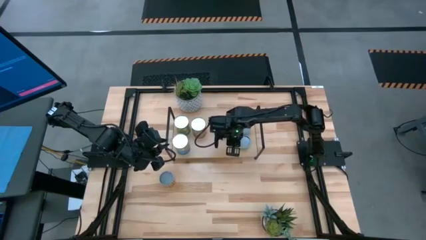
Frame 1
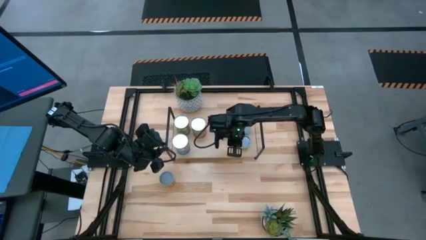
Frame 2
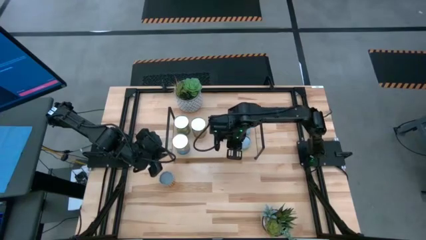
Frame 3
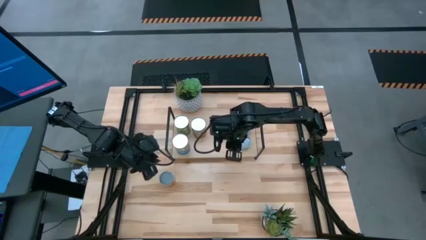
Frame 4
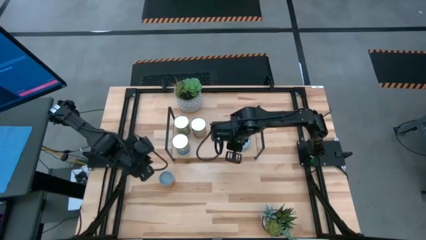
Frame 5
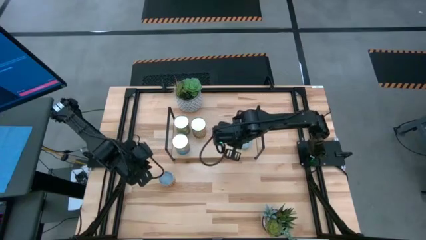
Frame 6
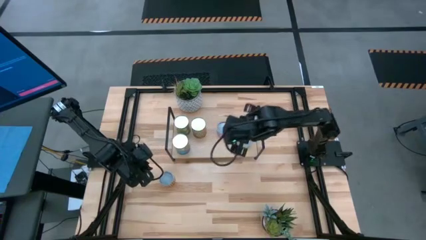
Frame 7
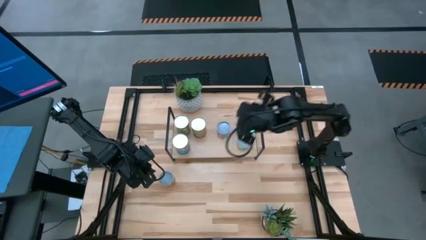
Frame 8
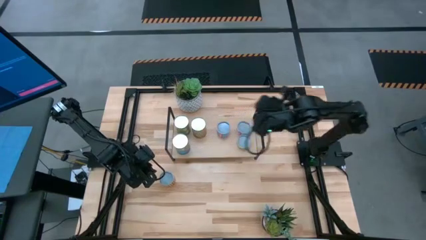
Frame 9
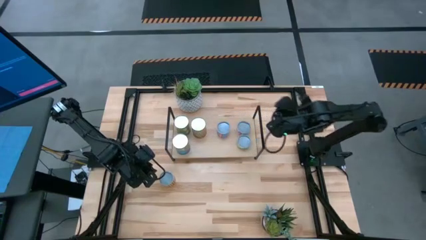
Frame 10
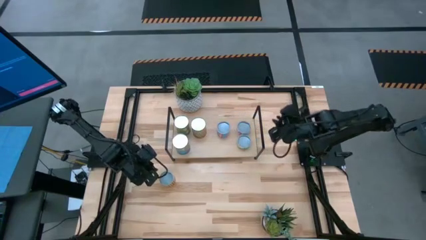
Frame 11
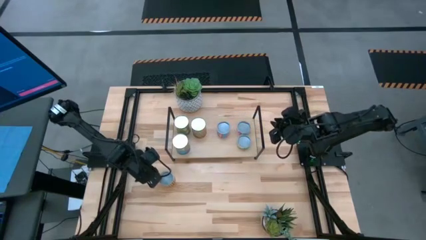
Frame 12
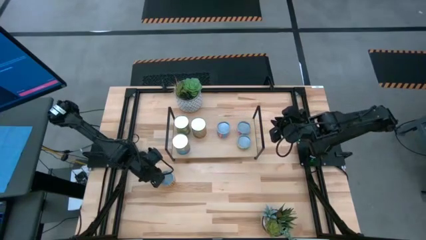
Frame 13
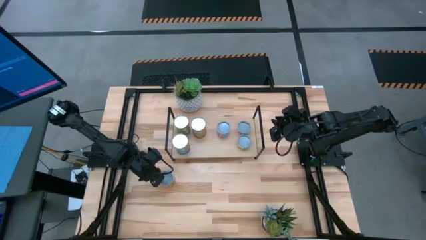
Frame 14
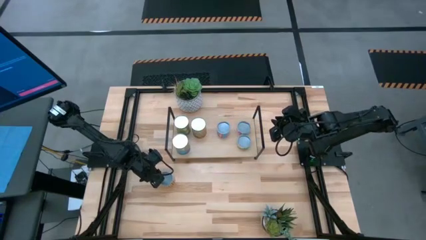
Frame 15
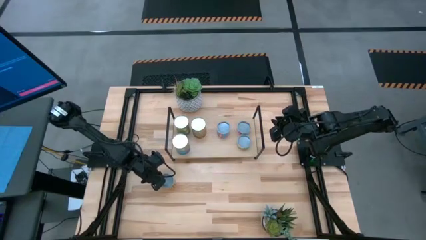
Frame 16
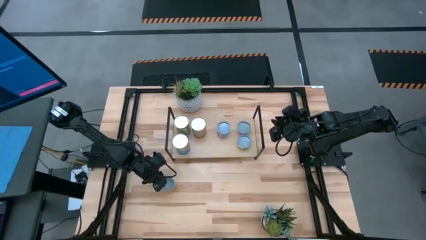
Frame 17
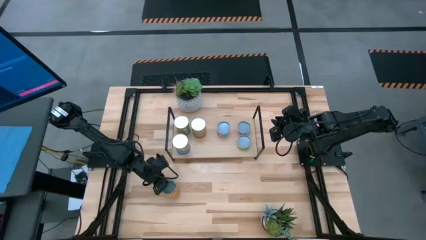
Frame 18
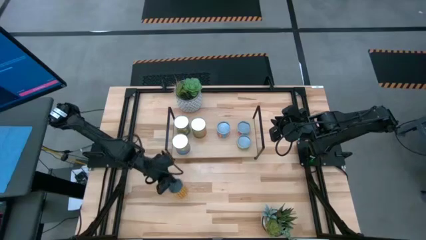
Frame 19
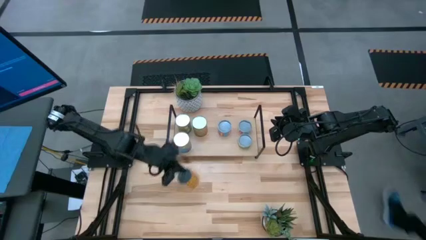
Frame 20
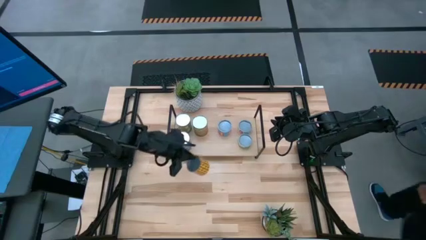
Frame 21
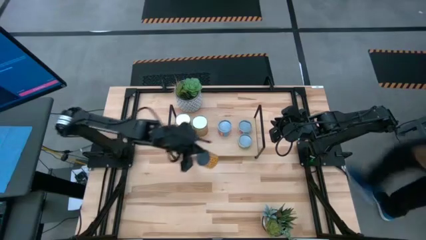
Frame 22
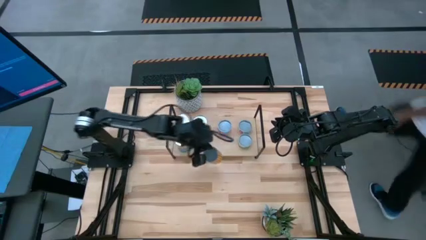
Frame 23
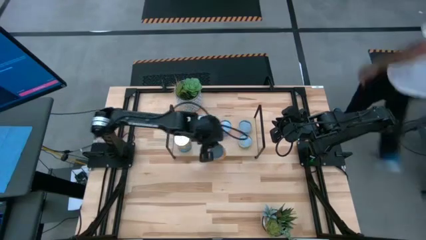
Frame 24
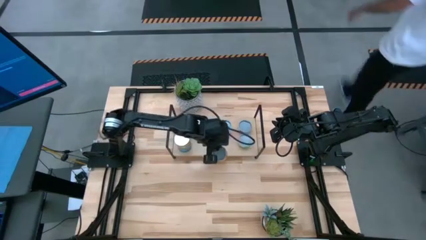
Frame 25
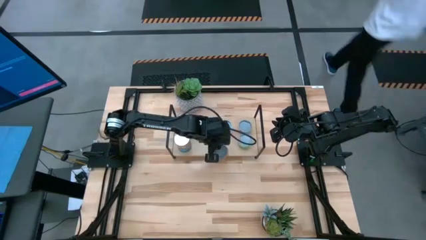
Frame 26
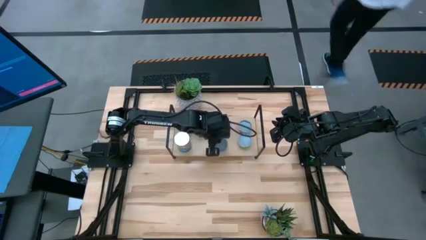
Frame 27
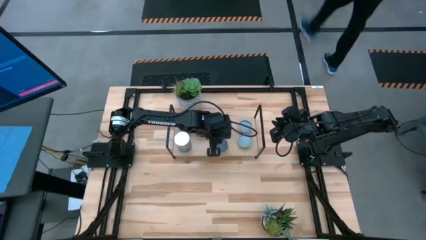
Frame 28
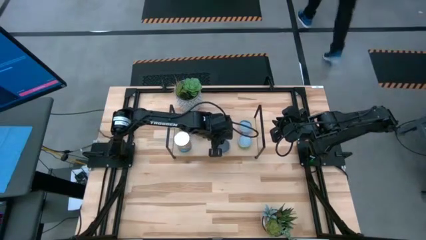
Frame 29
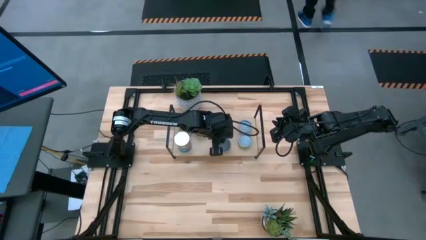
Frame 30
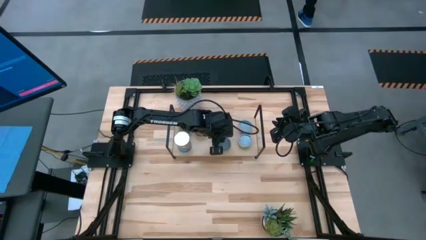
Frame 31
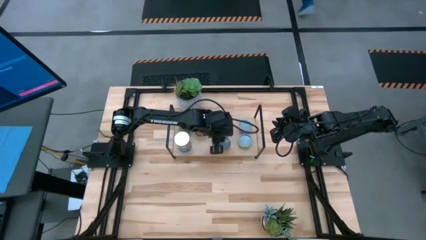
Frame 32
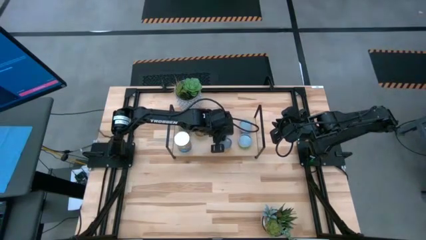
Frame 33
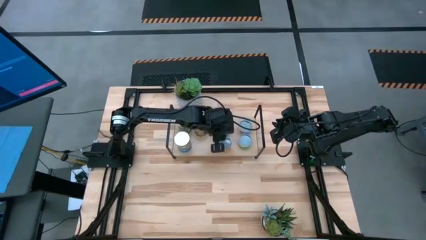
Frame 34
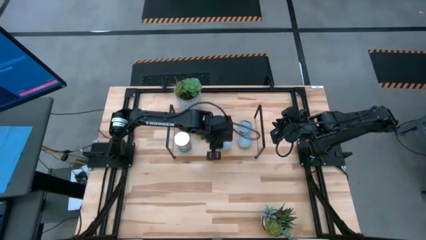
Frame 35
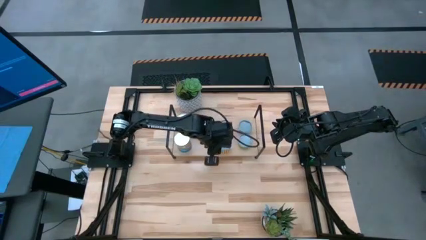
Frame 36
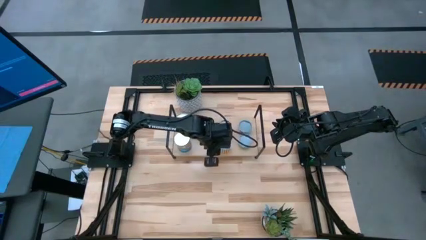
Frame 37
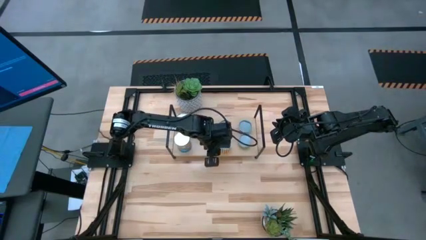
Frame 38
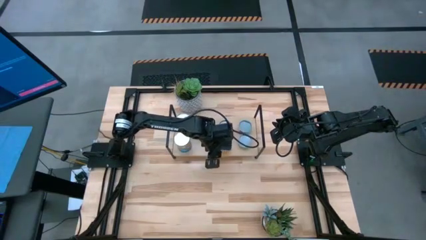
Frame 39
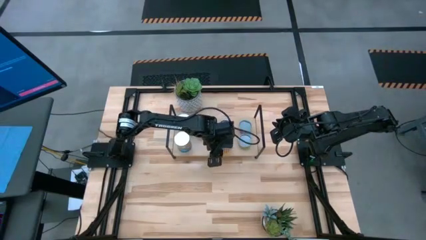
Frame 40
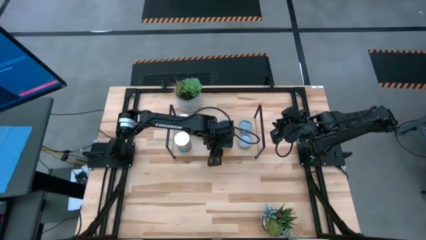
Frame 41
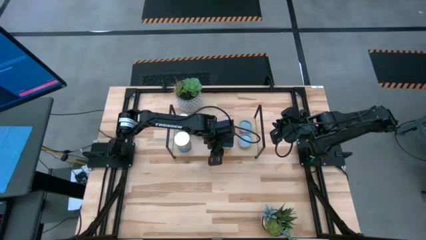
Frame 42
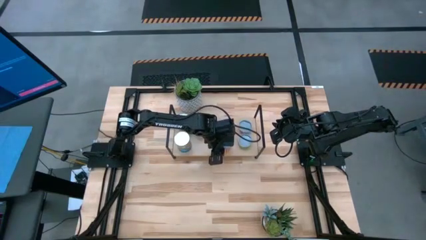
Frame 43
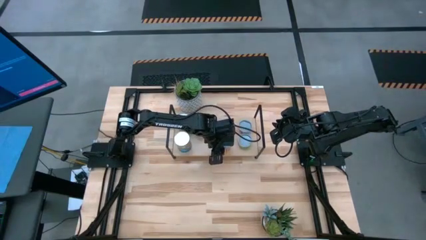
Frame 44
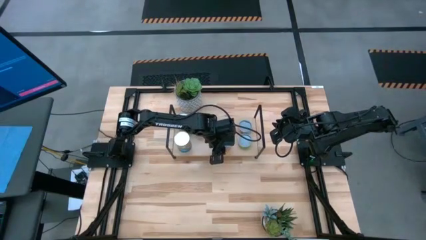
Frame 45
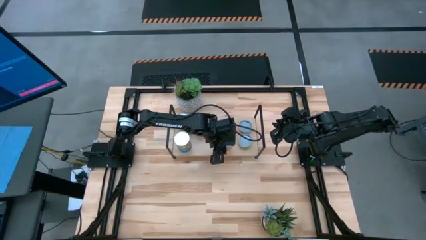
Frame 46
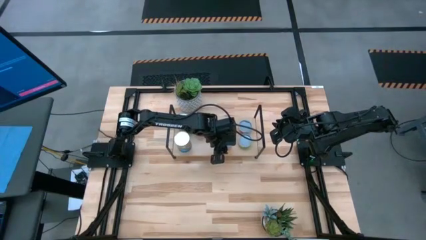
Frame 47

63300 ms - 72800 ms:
Task: Pick and place cans onto a shelf
Put the canned spicy black beans on the shelf

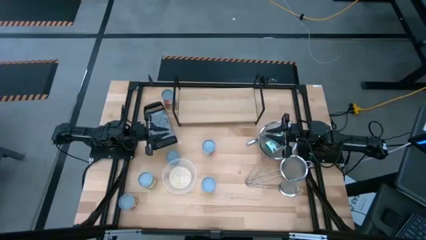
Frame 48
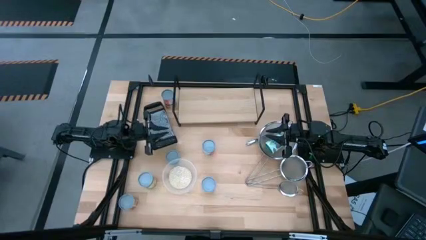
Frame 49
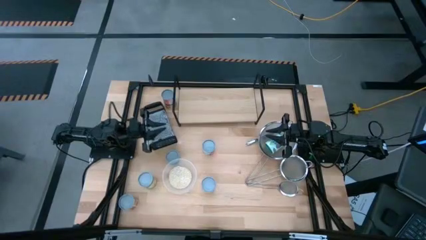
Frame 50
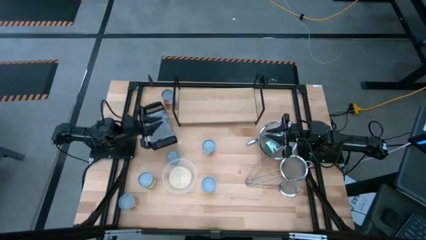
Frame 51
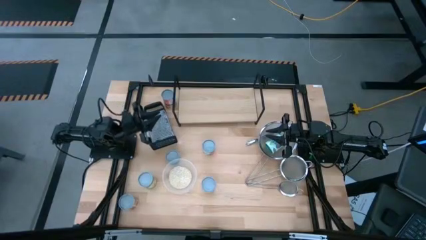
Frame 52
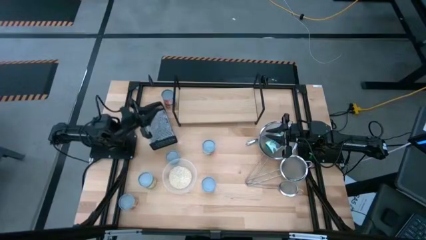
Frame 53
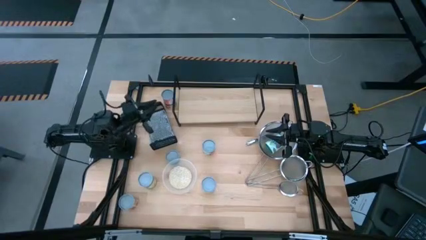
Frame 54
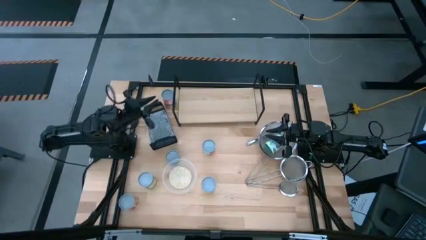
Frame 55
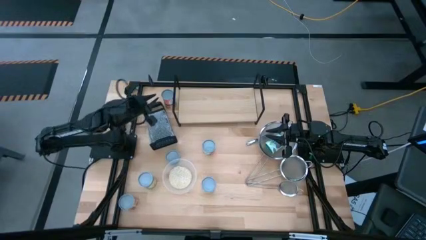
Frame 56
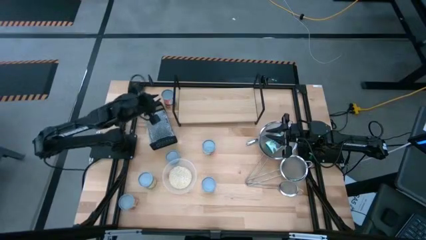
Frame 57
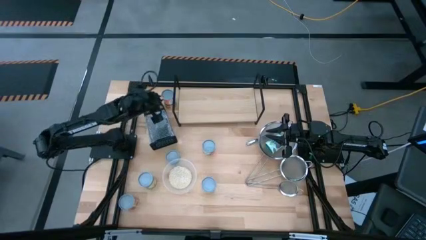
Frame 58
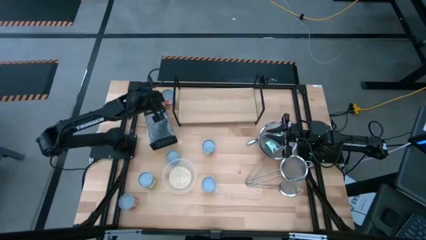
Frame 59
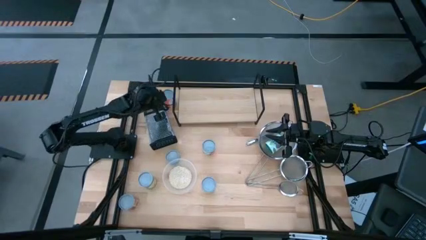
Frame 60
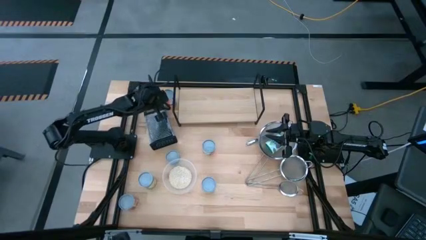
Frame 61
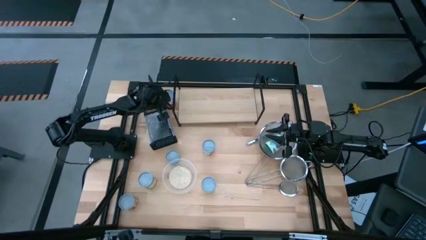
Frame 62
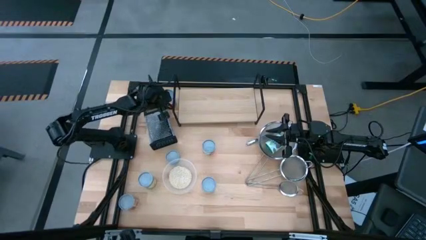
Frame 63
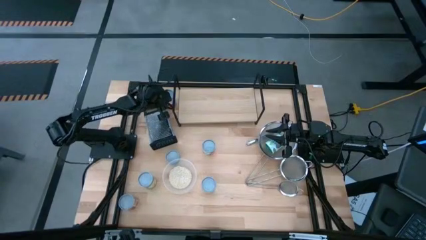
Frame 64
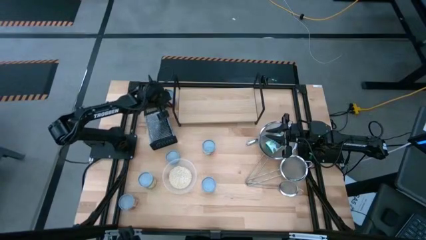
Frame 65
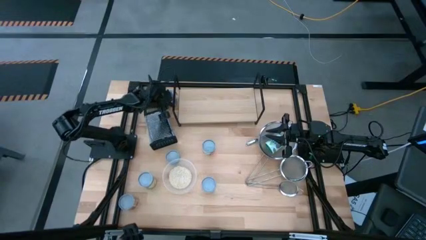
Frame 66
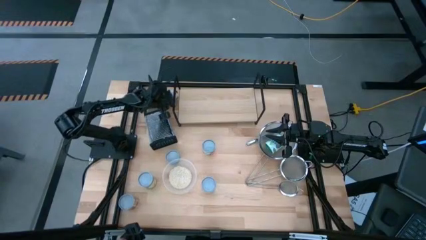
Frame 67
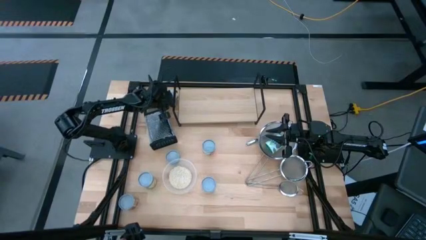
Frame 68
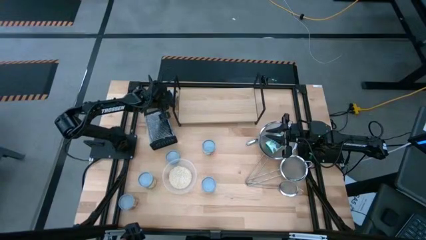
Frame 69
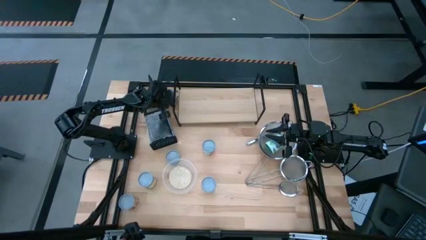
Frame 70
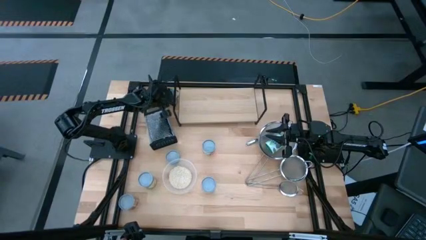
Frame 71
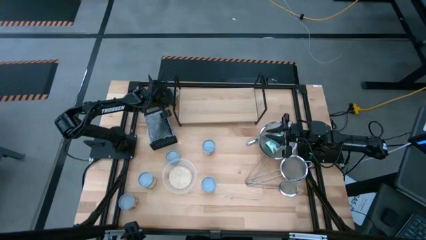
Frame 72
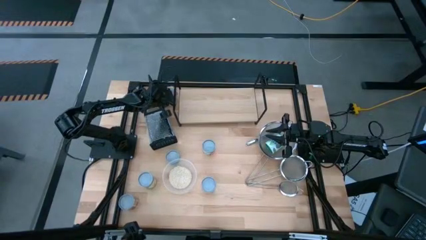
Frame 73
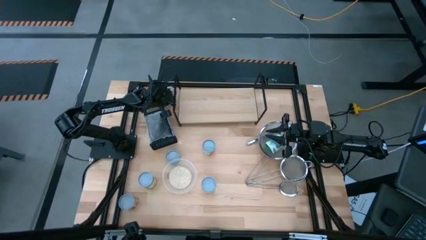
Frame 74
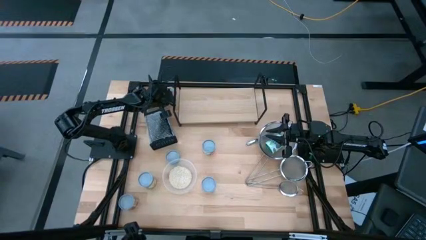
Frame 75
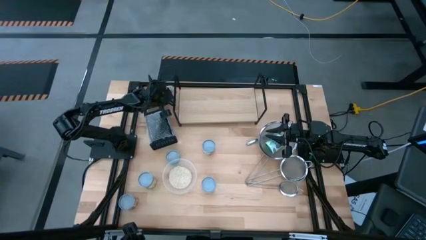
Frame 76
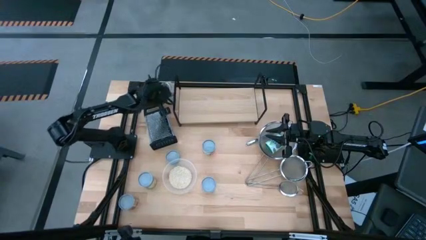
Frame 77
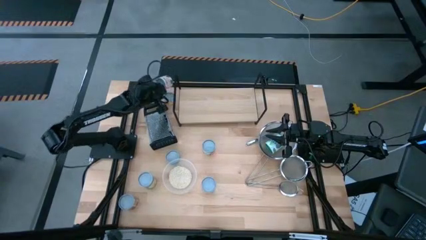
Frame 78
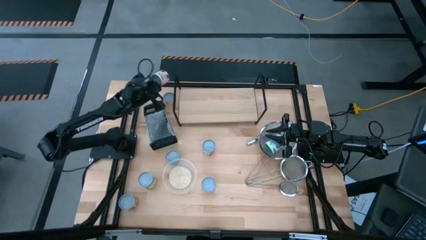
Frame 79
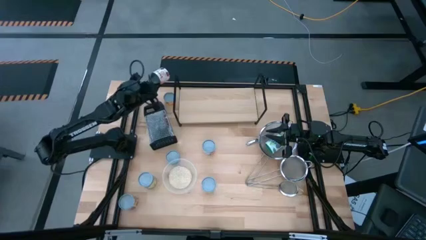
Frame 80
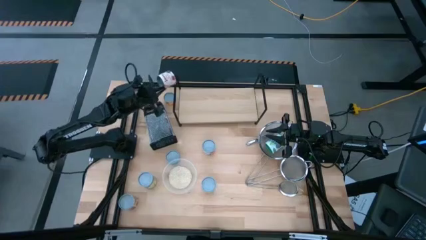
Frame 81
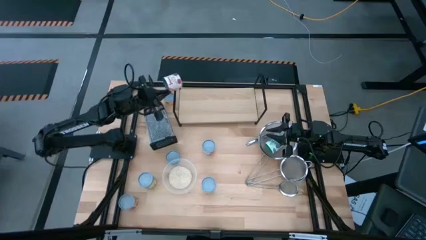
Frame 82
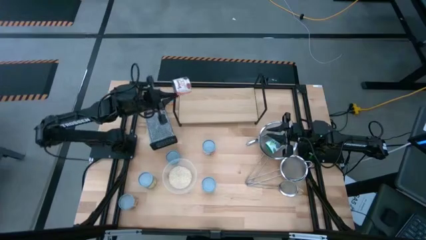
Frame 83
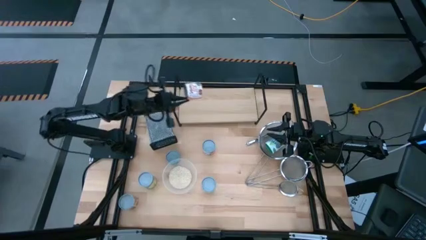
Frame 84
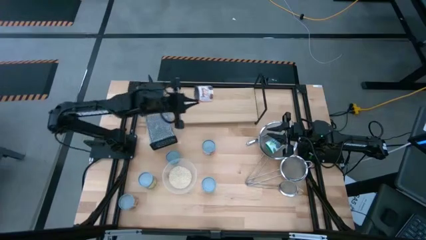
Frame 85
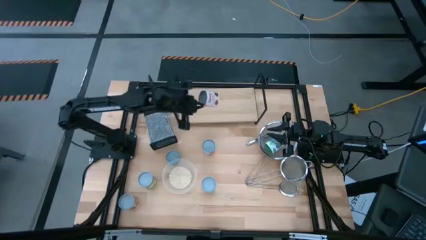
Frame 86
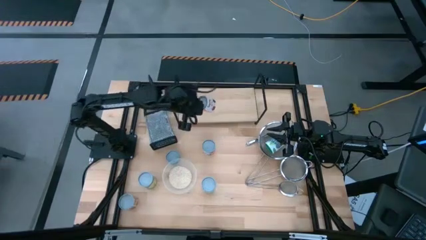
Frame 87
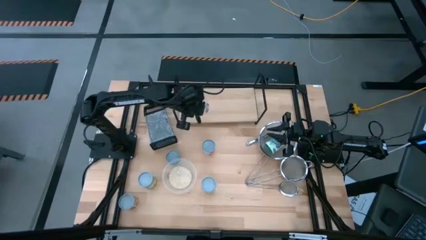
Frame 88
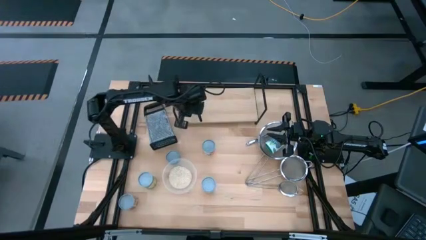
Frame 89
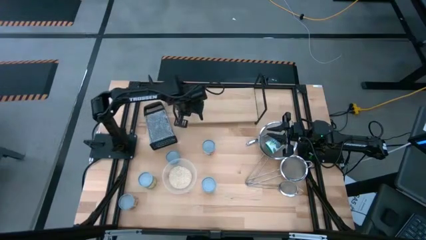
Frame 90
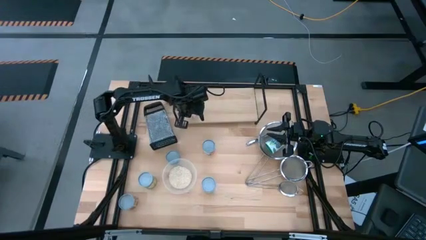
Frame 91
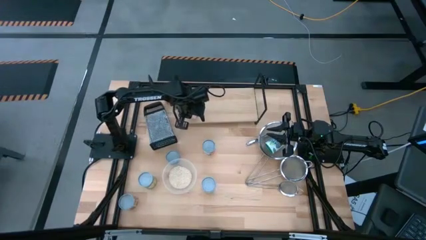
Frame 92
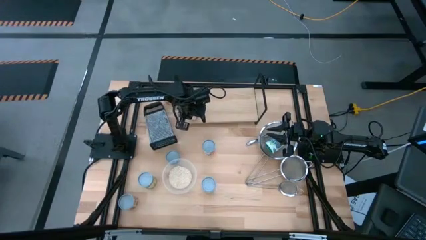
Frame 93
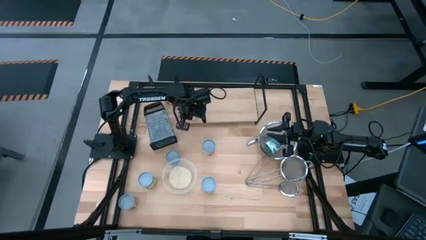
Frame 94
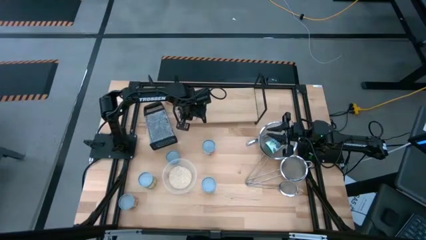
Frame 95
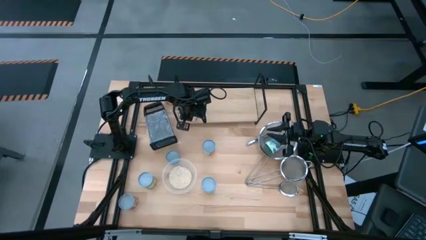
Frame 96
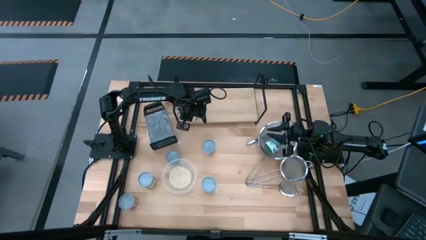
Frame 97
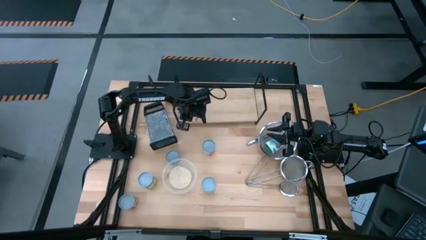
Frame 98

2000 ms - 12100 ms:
Task: Pick and place cans onto a shelf
Put the orange spaghetti sauce can on the shelf
